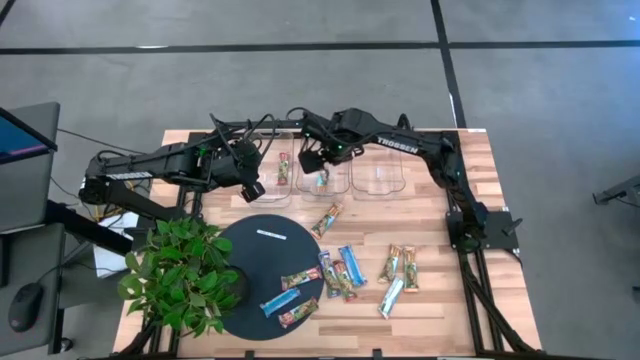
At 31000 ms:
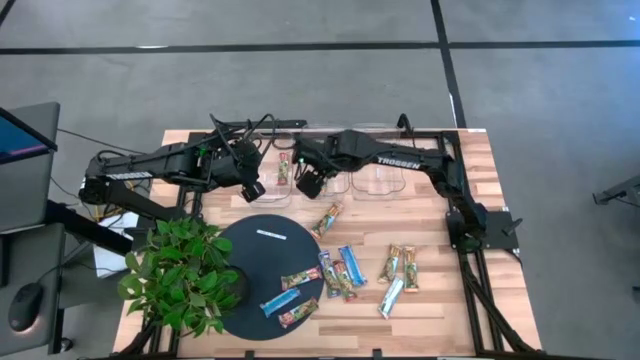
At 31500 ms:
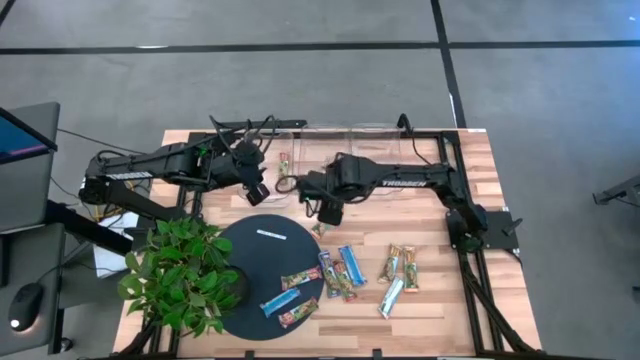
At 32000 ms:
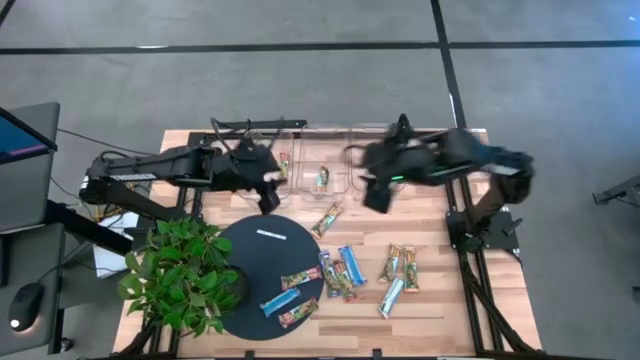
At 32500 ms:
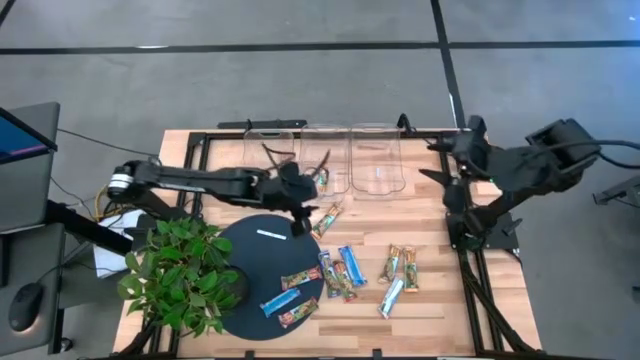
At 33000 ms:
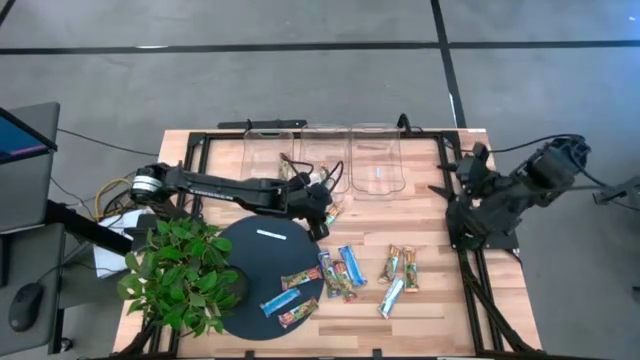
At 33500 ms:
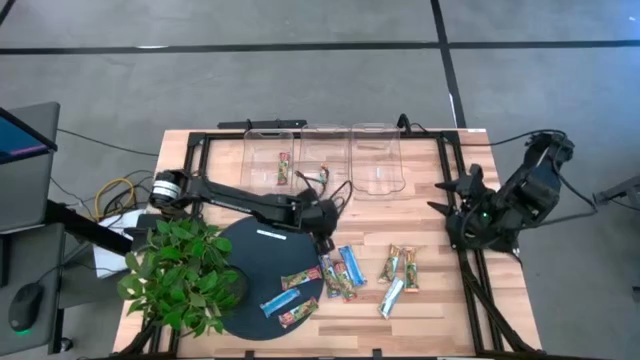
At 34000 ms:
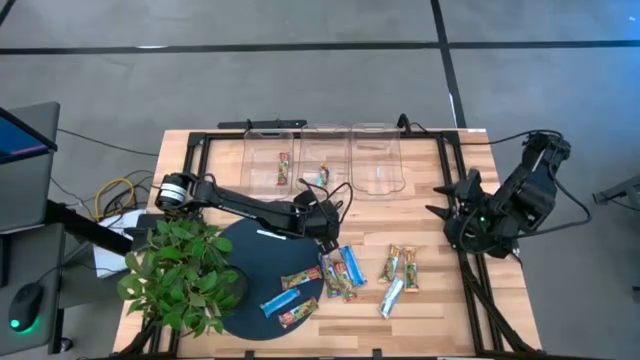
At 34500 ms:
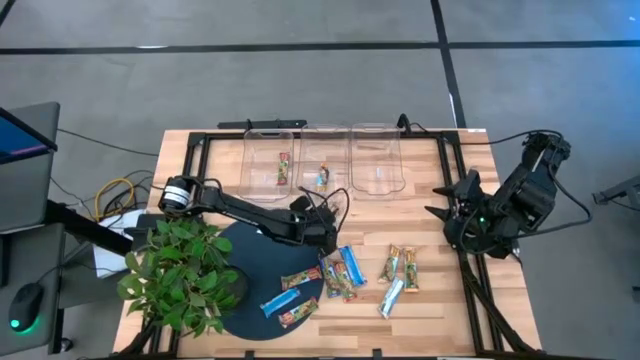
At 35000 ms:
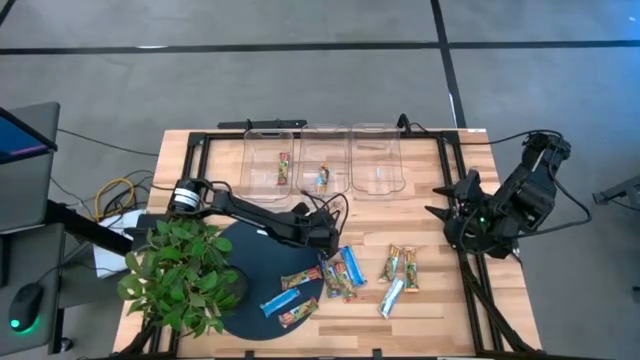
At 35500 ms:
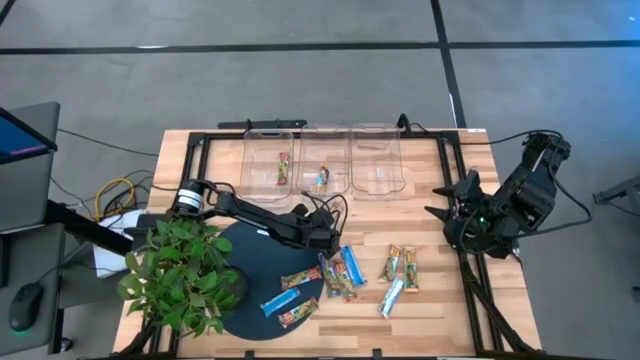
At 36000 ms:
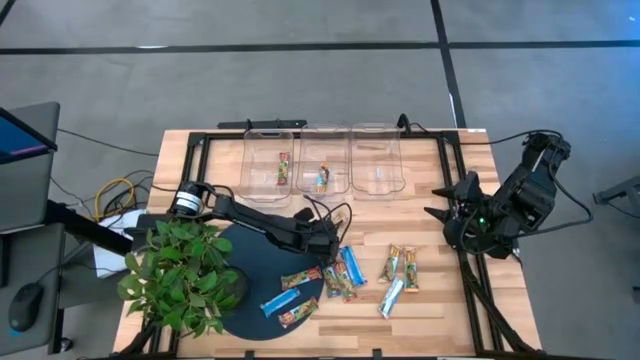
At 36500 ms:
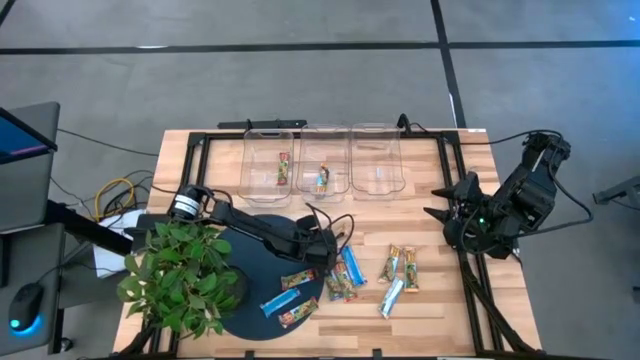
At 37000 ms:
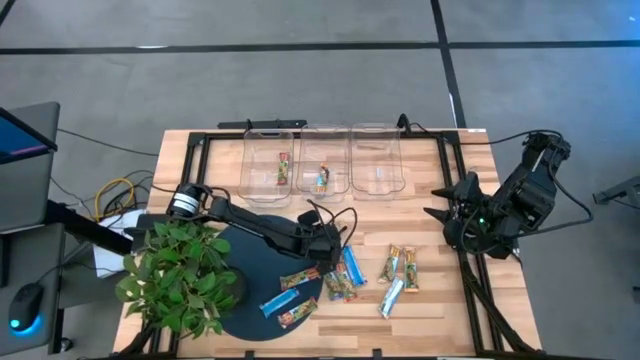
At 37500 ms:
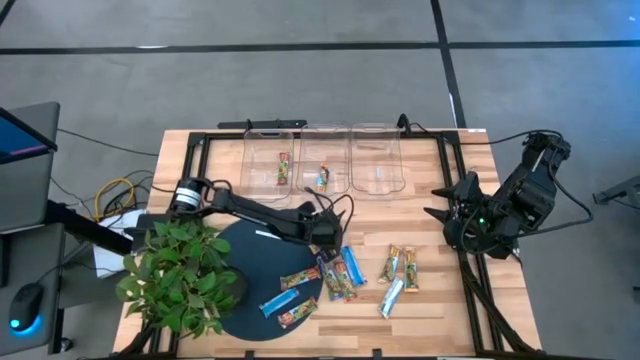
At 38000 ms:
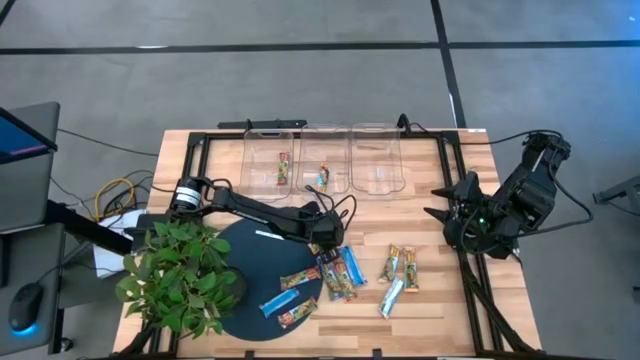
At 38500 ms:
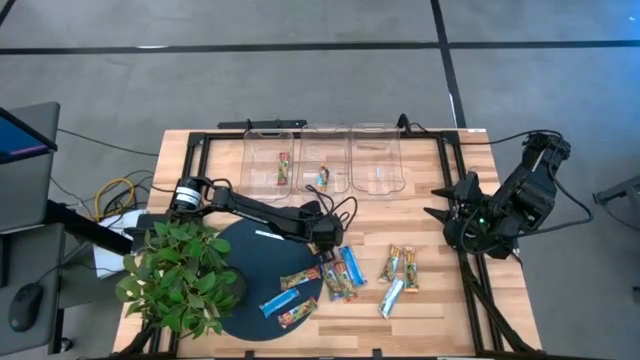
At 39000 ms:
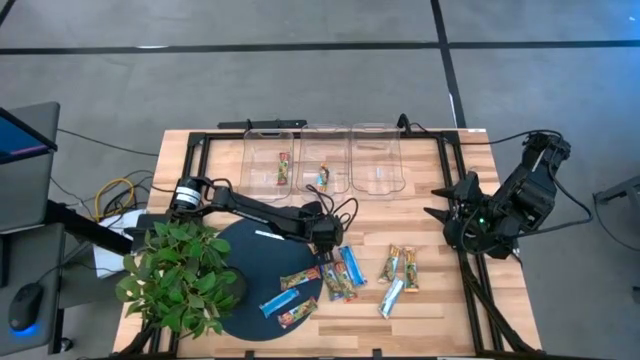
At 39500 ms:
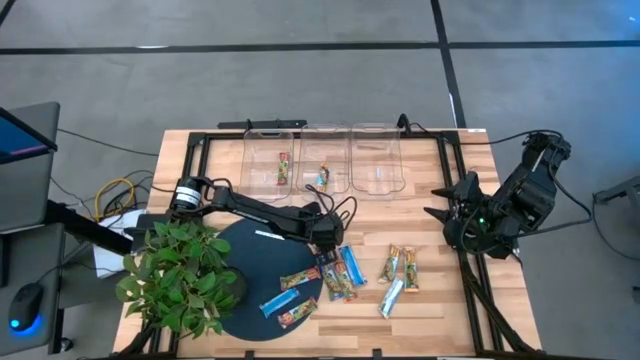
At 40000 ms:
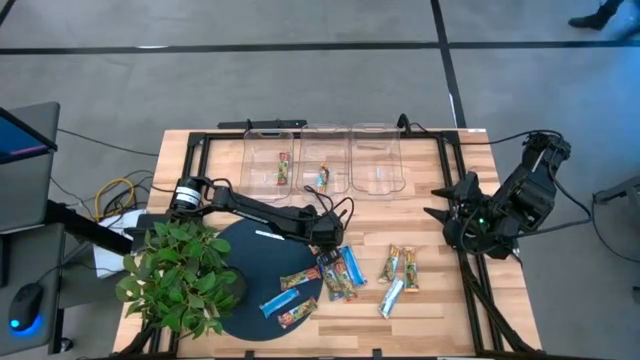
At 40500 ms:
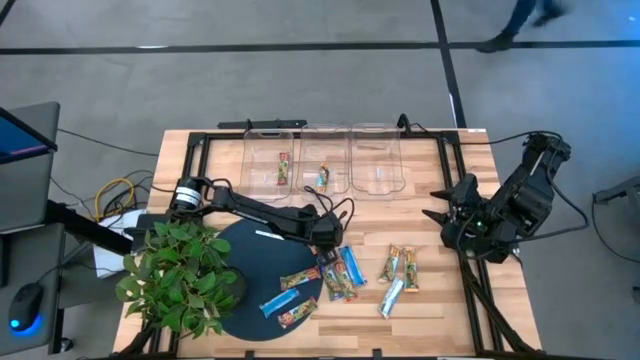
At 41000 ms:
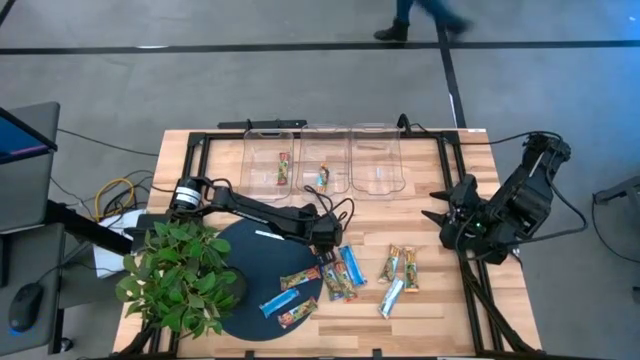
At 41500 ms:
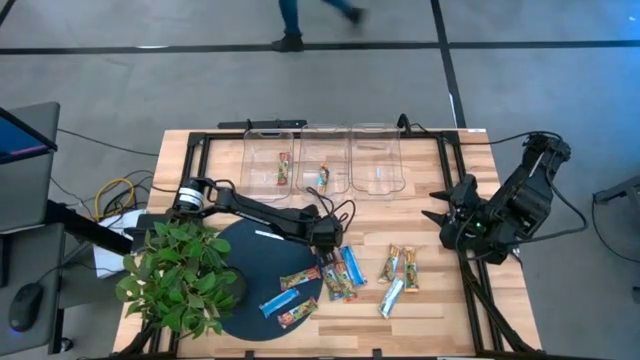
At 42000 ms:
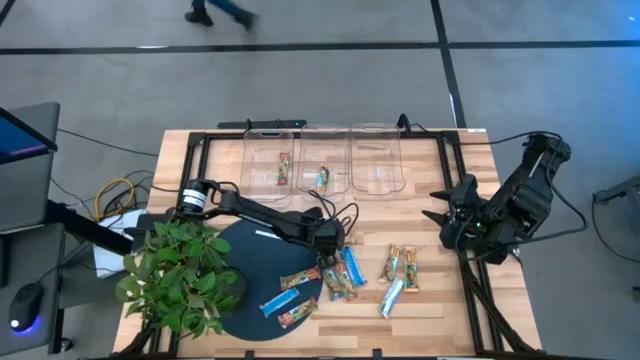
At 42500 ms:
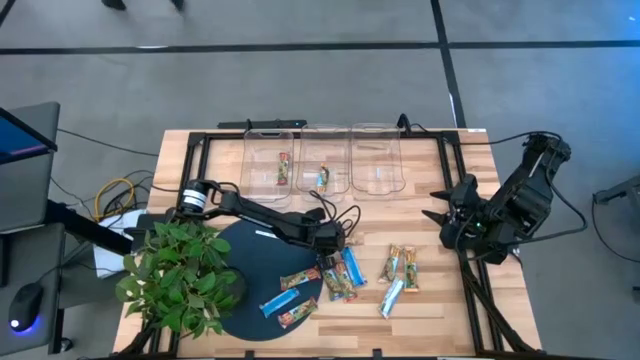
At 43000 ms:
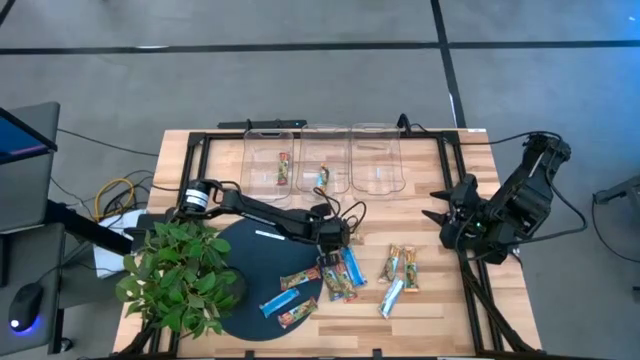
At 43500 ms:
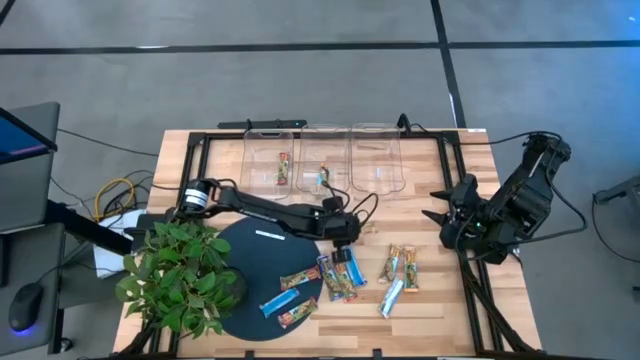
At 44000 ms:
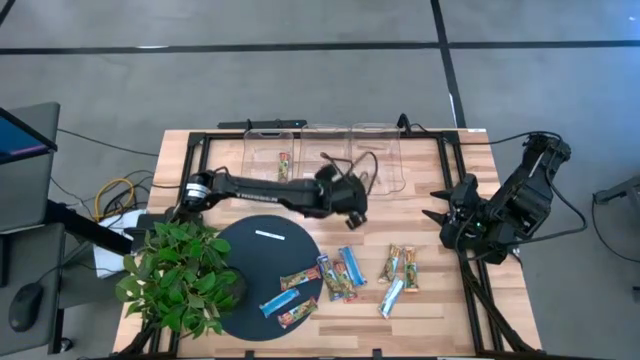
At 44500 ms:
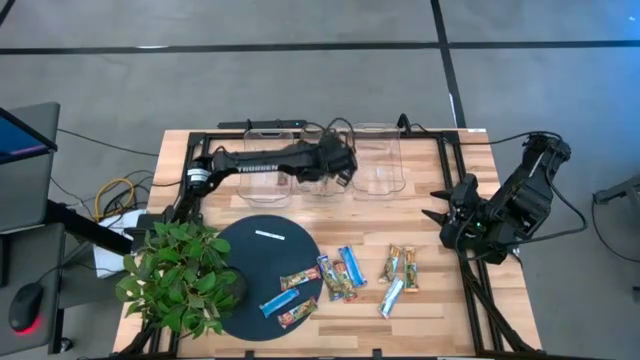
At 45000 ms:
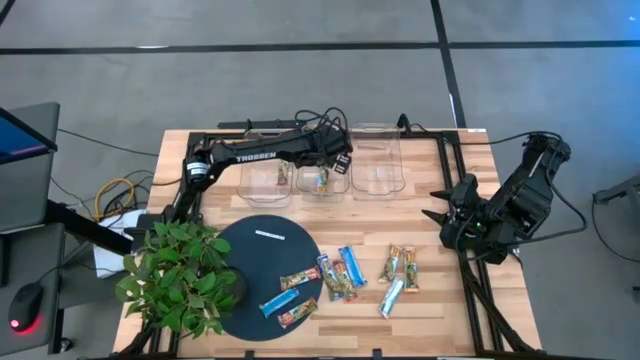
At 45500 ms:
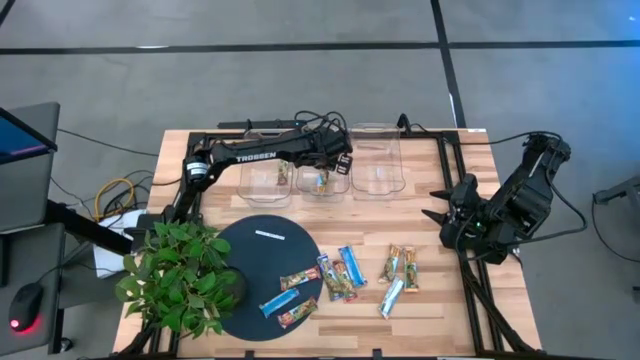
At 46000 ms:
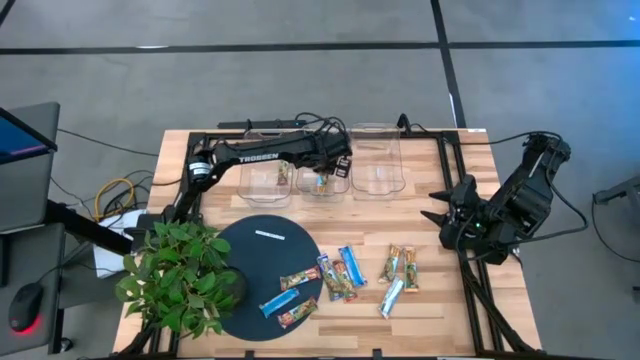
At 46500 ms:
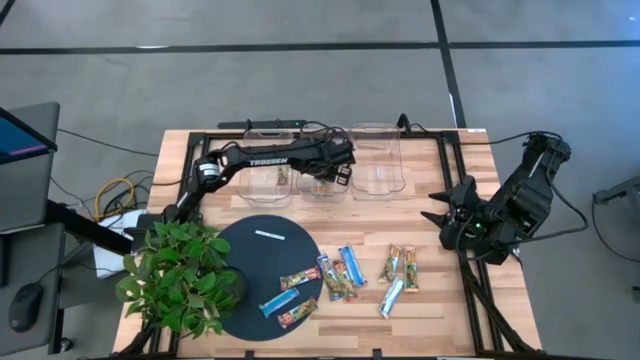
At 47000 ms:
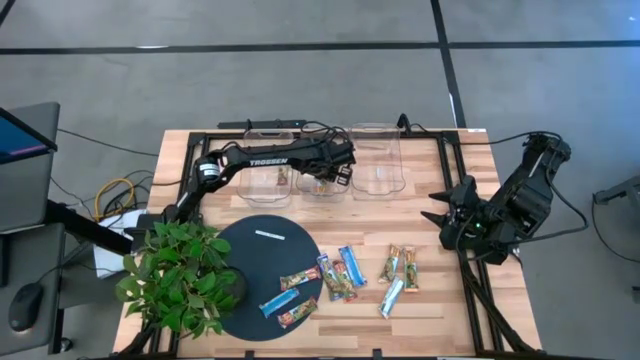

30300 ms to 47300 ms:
Task: Pick and place Granola Bars by type
Put the yellow granola bar into the middle transparent bin
